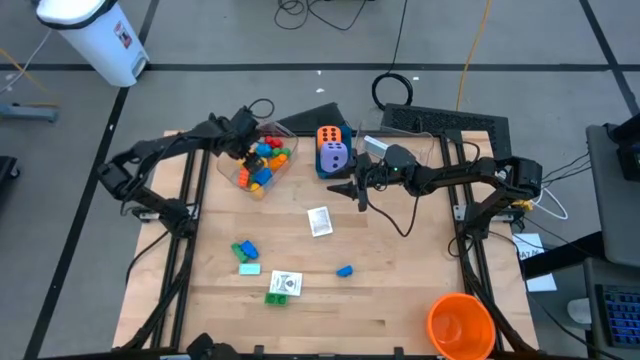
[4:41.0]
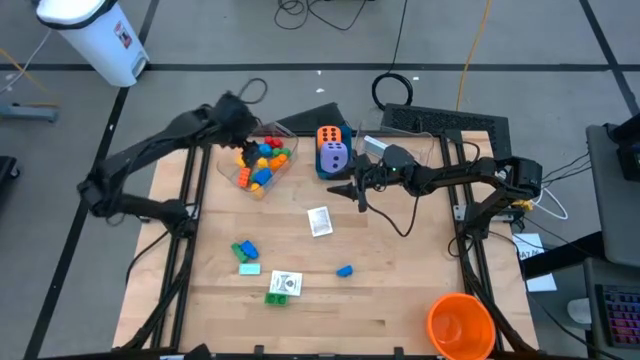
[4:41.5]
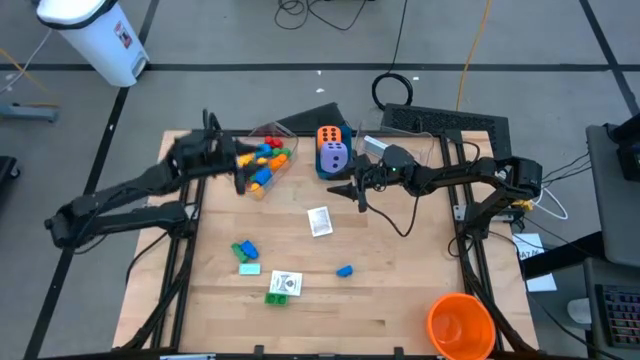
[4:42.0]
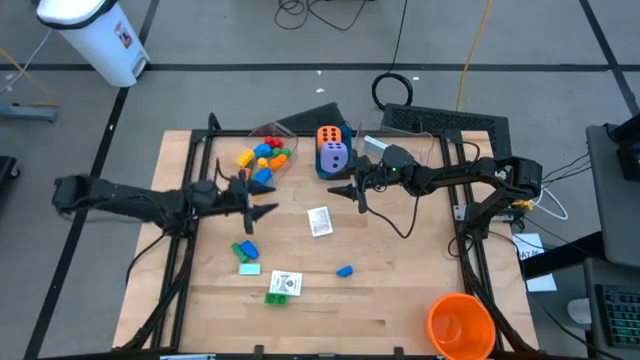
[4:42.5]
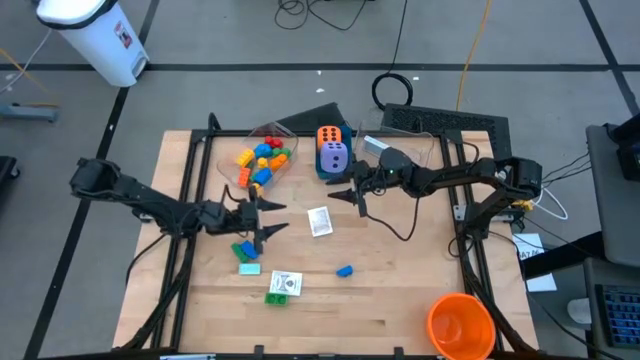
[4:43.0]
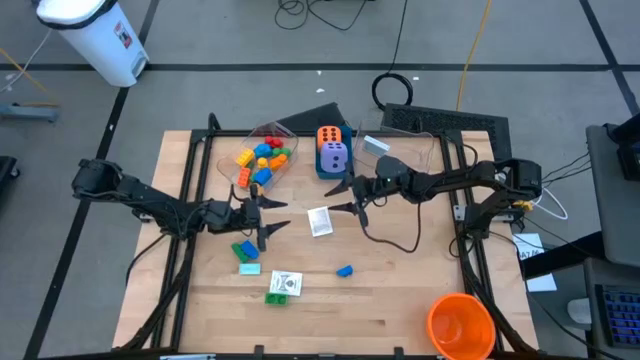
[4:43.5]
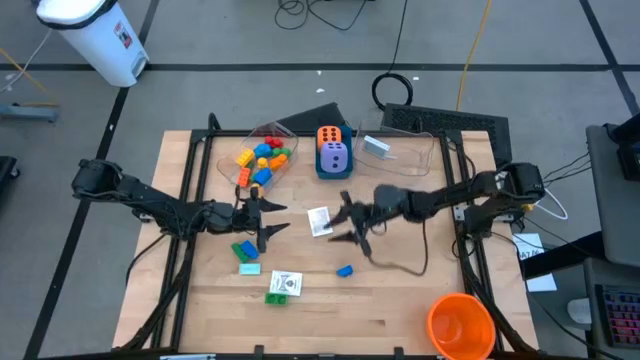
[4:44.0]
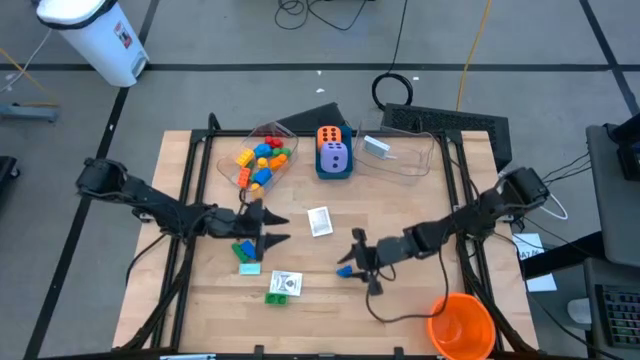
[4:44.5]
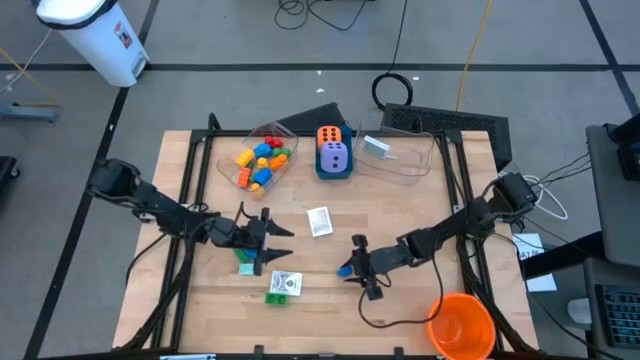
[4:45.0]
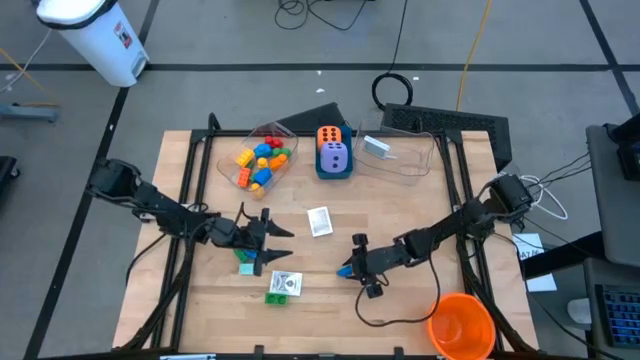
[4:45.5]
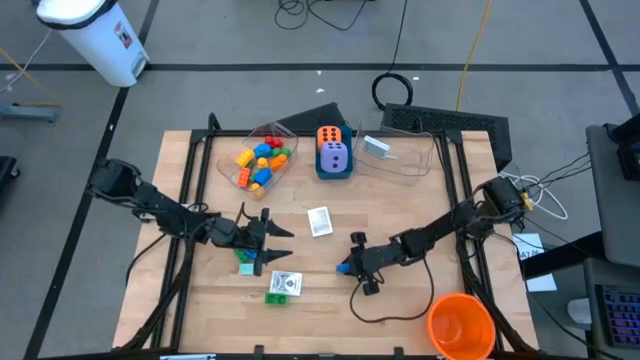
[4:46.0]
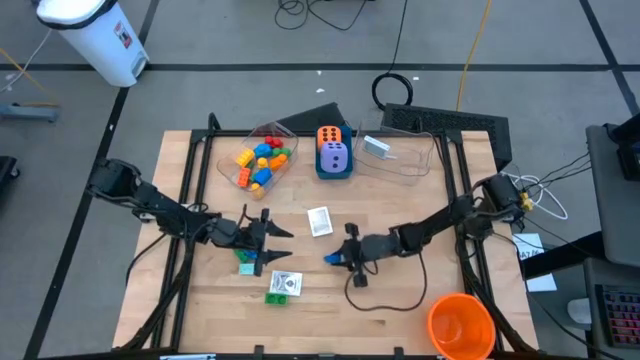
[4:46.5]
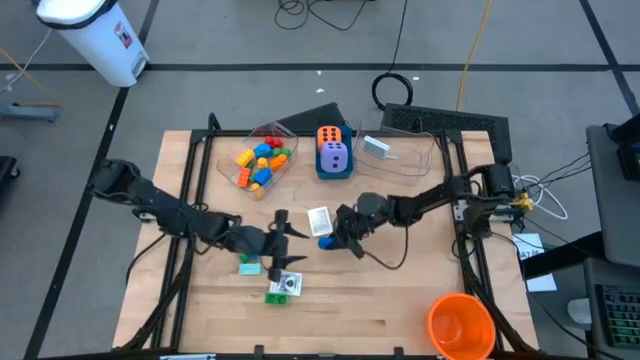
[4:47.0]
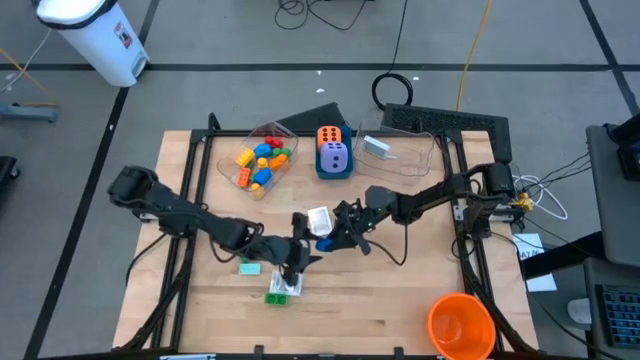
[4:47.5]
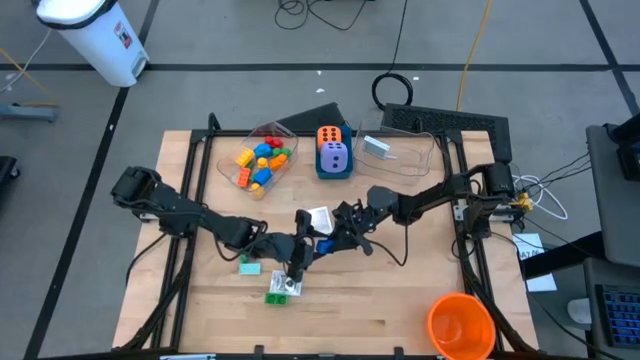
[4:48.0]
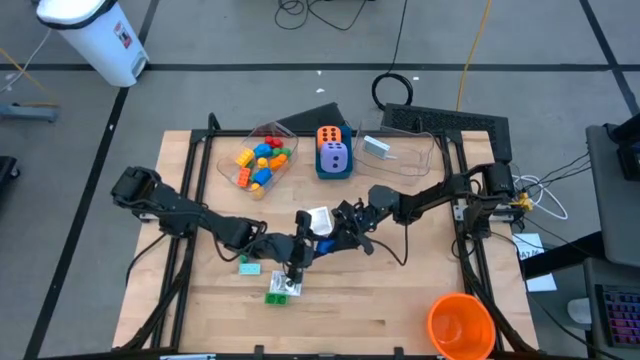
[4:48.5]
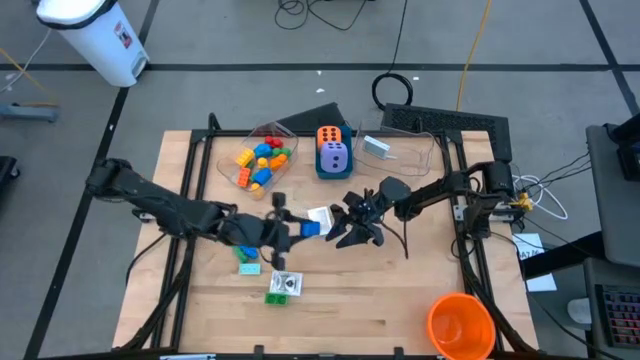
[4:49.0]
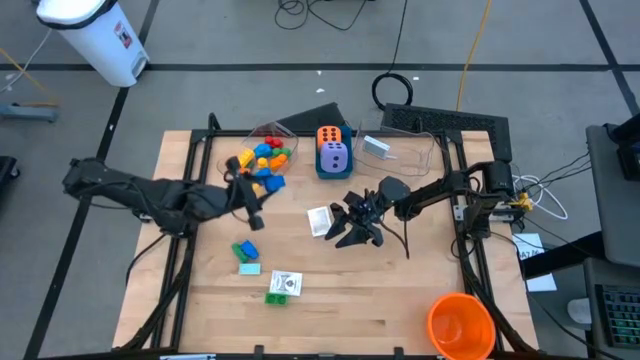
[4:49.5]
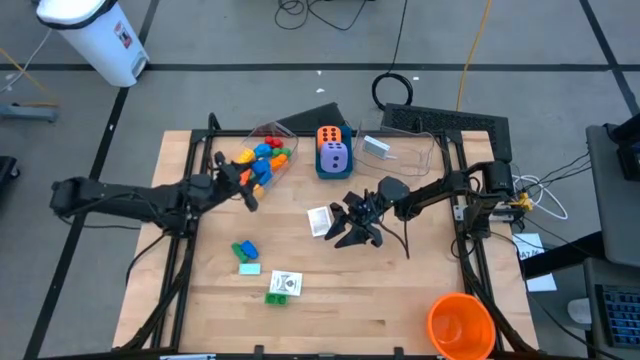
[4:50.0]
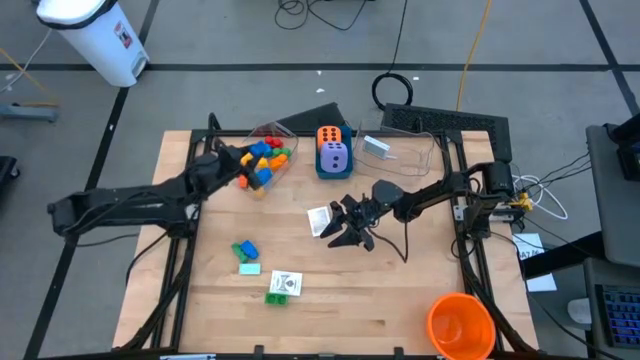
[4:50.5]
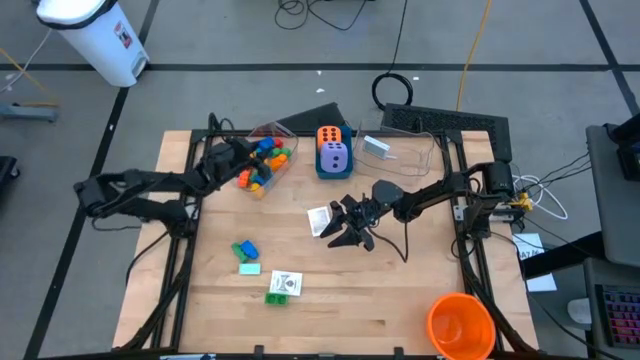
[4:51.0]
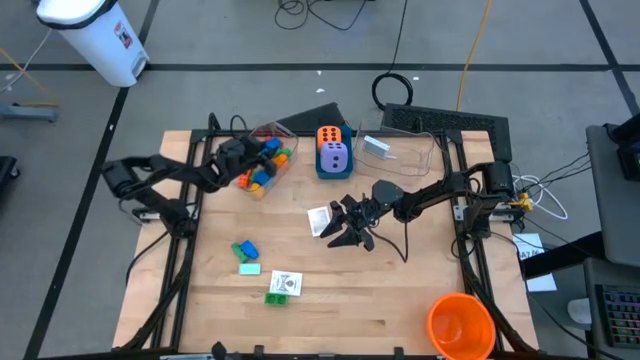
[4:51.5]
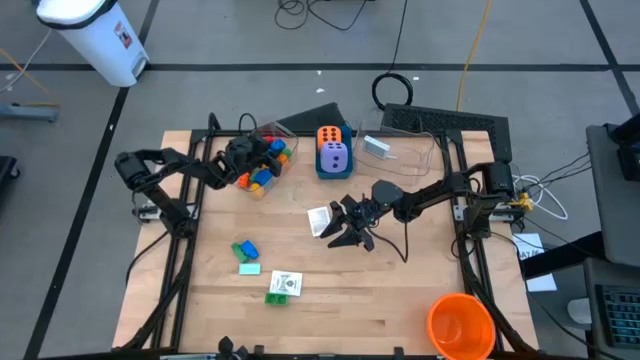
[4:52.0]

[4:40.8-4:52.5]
Task: Pick & Place Toys
Put the blue game piece into the left transparent bin

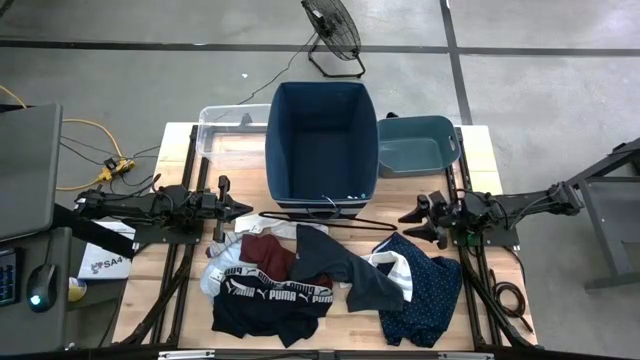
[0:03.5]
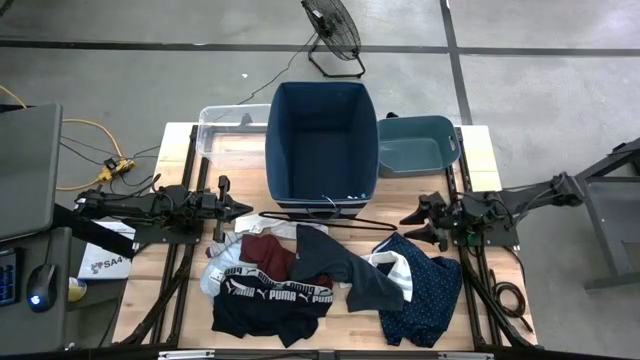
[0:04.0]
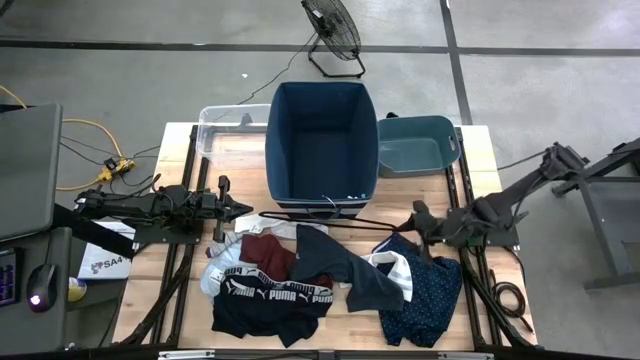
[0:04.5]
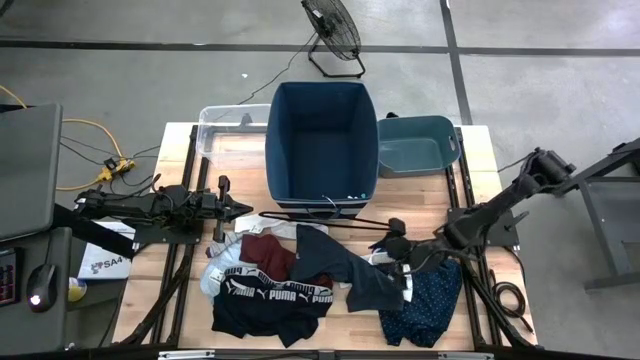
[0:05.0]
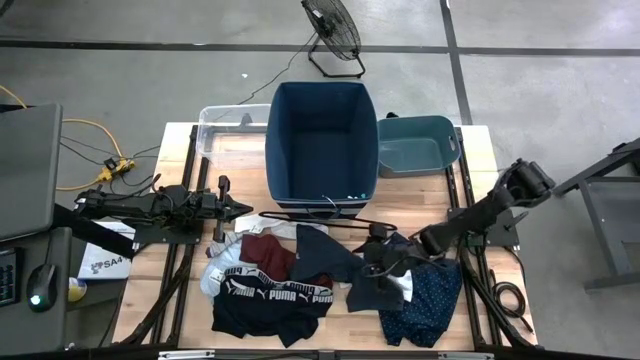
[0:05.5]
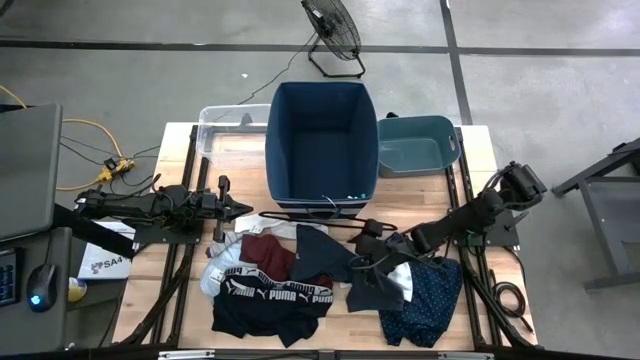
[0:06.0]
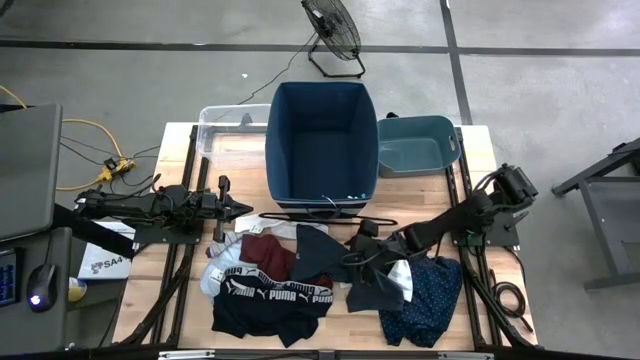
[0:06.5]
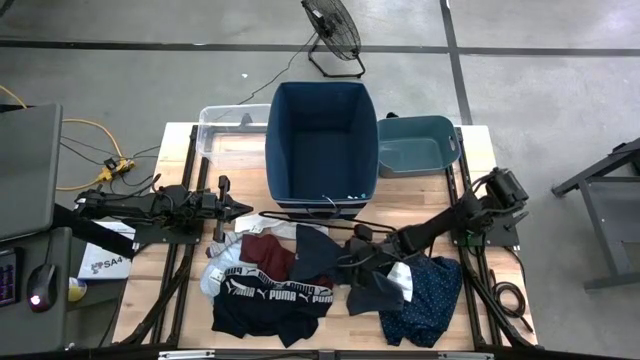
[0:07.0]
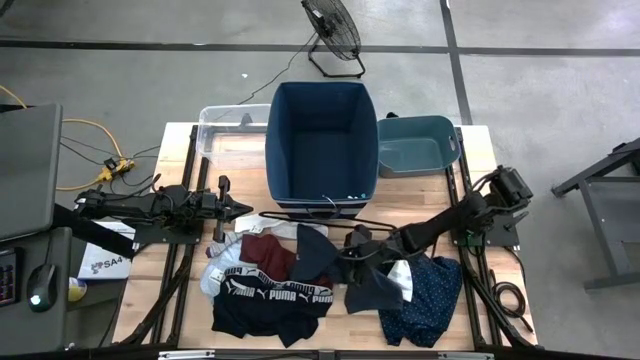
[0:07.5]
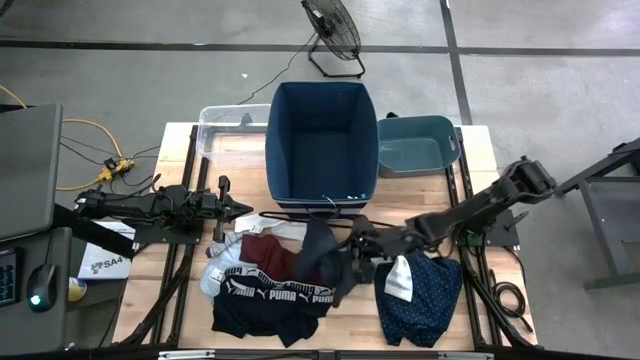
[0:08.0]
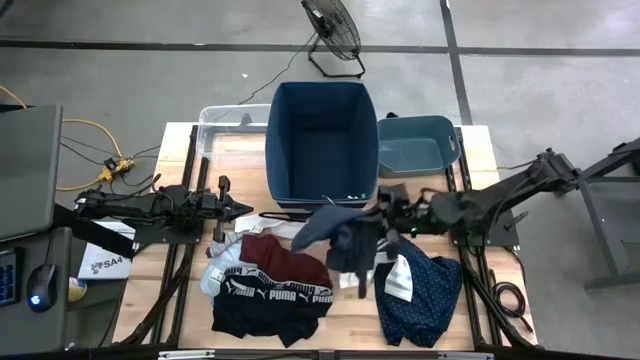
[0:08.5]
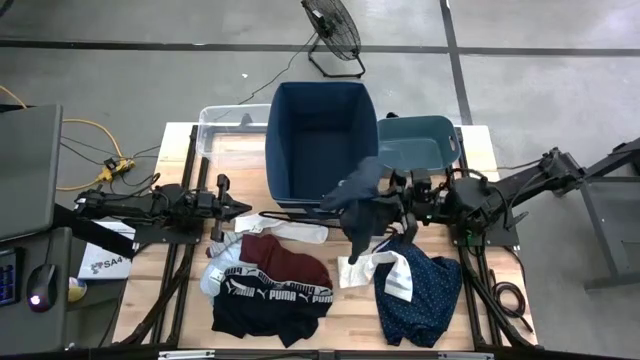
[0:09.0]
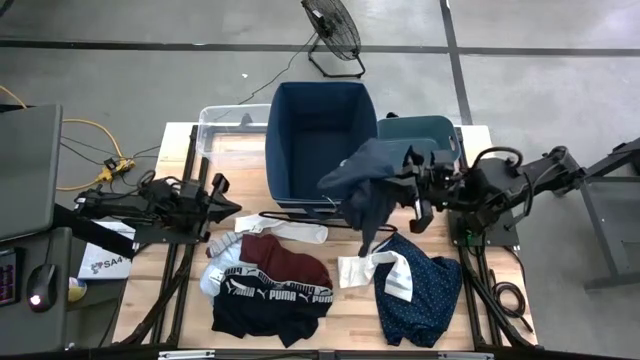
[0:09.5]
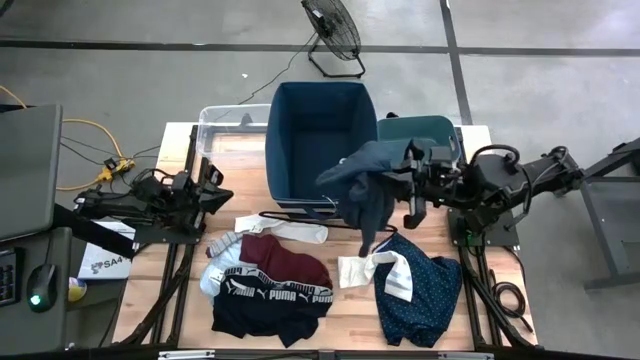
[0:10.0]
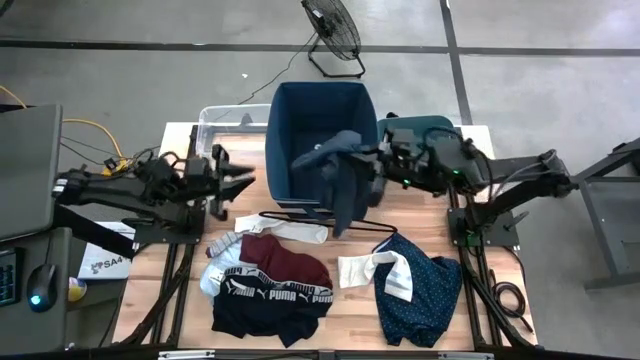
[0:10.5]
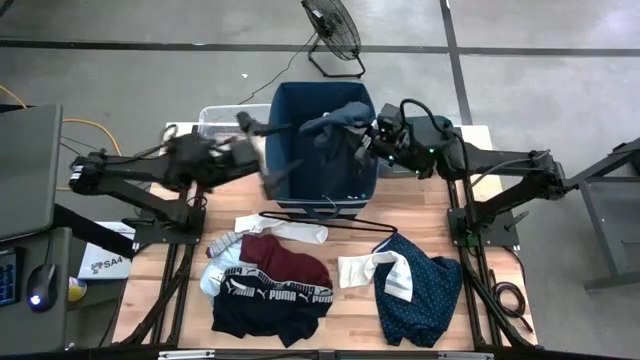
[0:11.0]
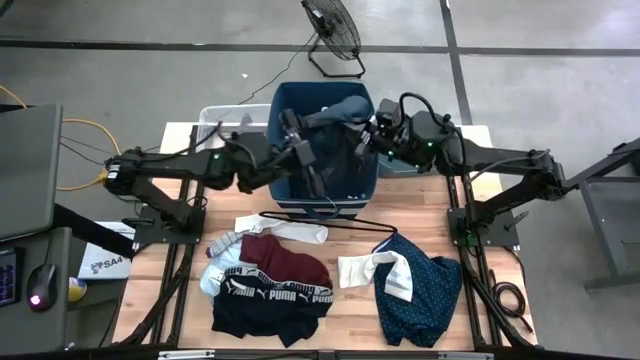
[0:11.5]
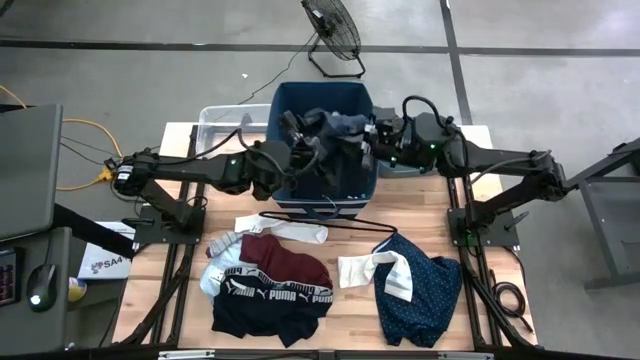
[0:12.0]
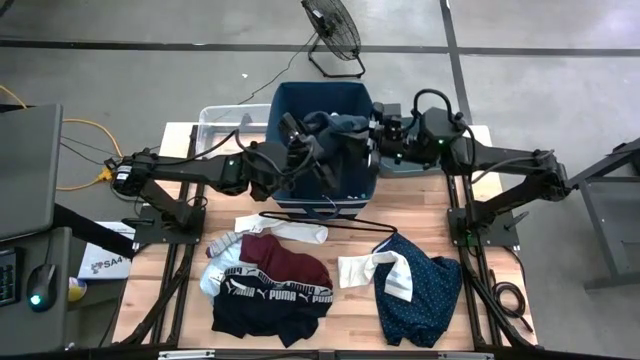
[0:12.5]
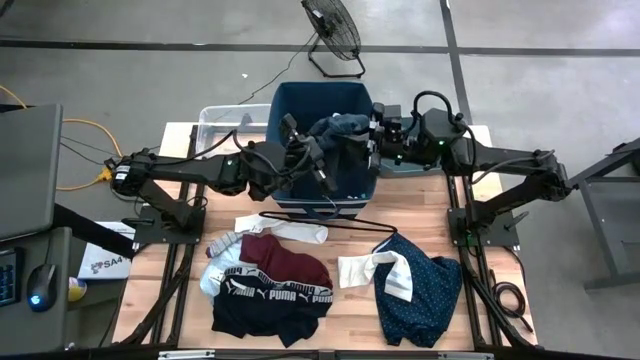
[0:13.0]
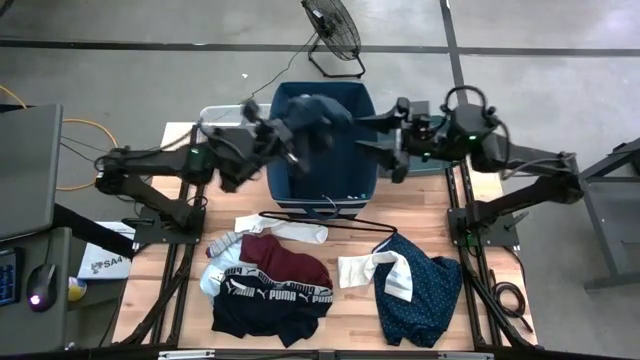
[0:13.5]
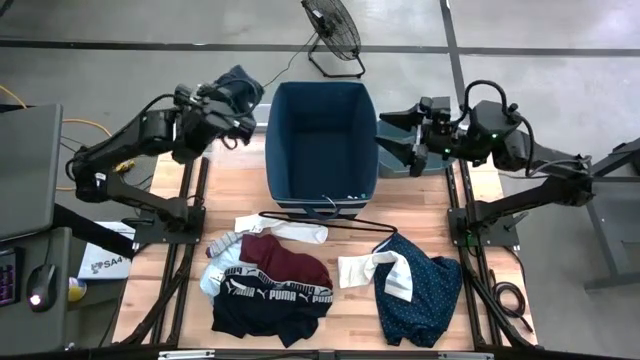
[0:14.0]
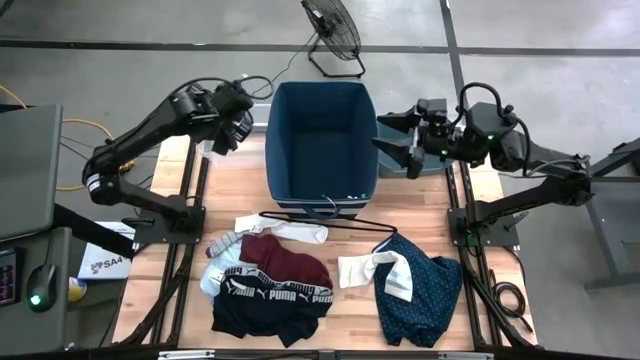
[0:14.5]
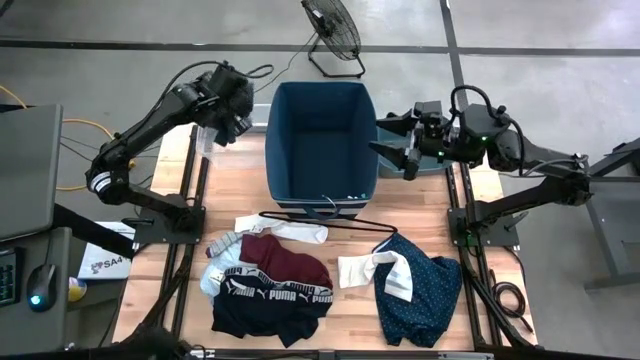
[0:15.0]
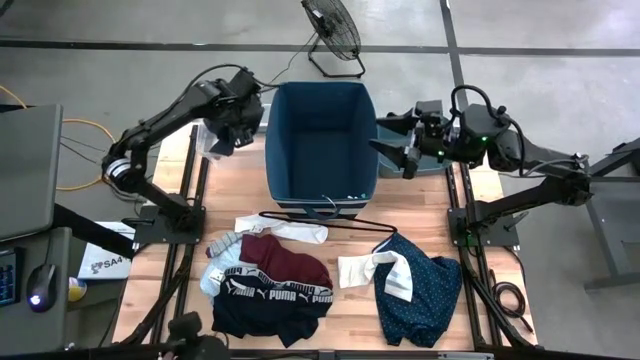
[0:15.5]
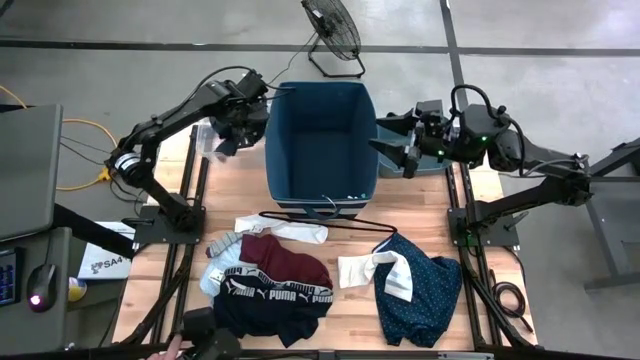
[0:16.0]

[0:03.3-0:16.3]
Task: Pick & Place Cloths
Put the black boxer into the transparent bin
